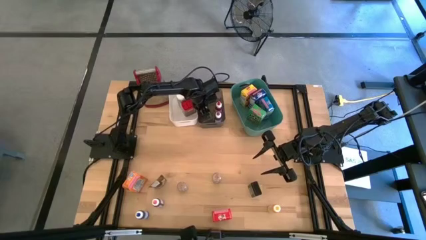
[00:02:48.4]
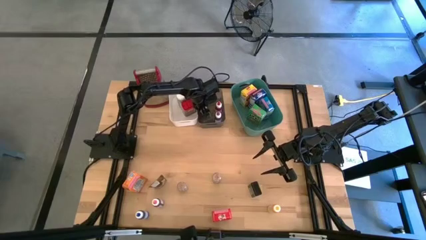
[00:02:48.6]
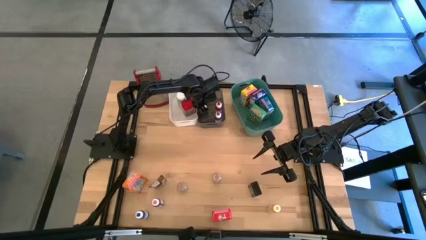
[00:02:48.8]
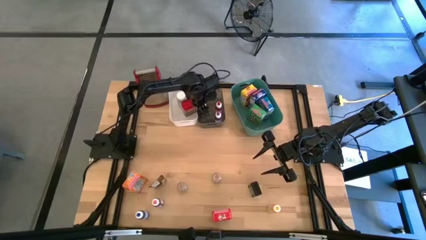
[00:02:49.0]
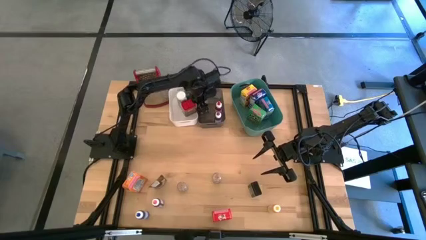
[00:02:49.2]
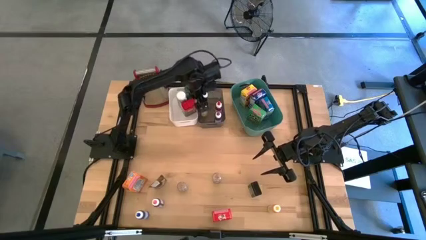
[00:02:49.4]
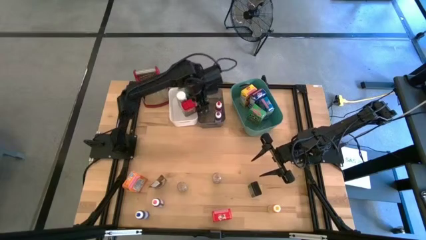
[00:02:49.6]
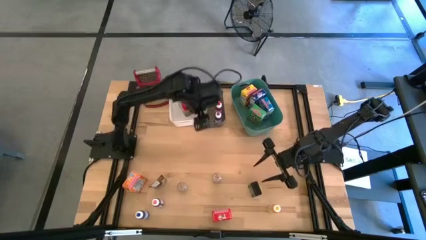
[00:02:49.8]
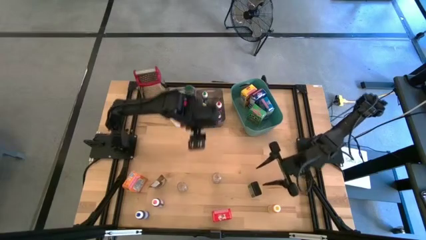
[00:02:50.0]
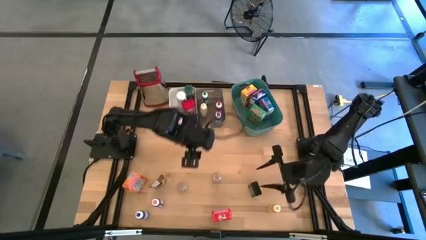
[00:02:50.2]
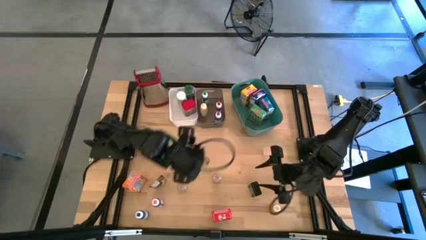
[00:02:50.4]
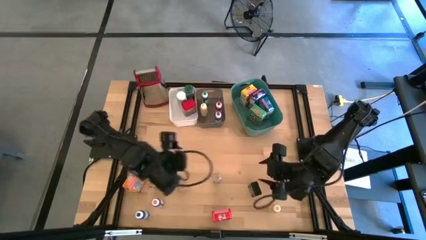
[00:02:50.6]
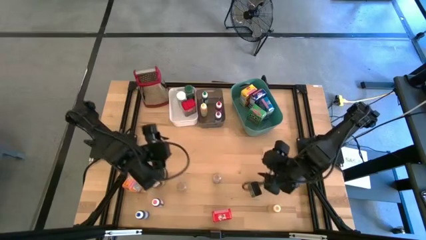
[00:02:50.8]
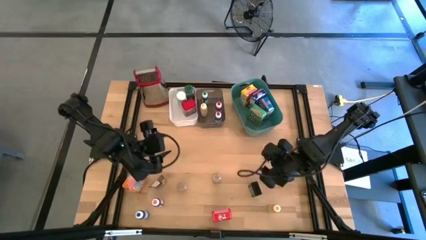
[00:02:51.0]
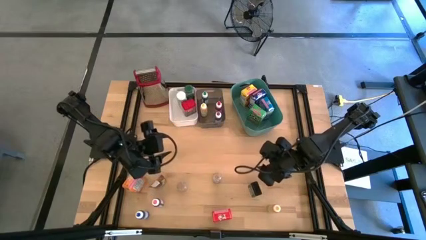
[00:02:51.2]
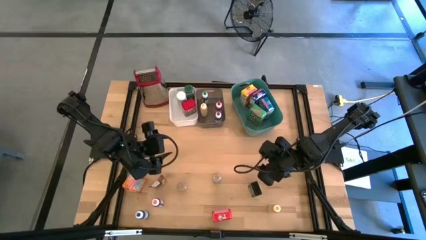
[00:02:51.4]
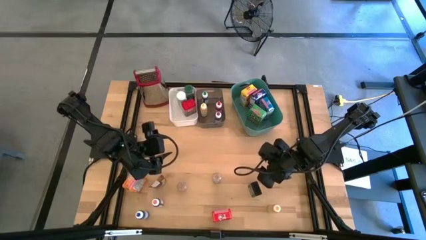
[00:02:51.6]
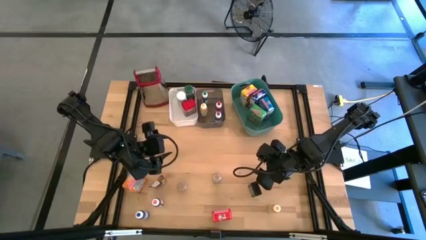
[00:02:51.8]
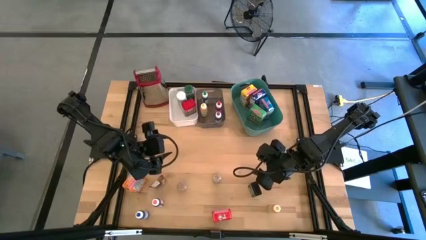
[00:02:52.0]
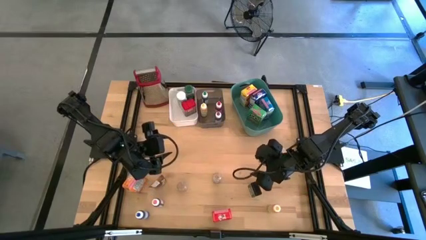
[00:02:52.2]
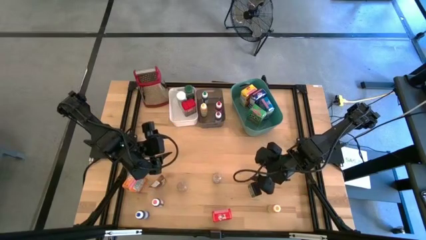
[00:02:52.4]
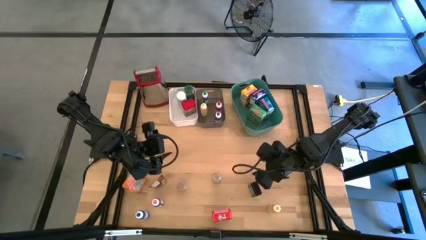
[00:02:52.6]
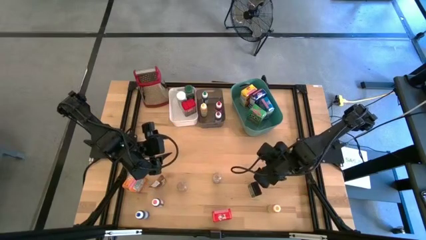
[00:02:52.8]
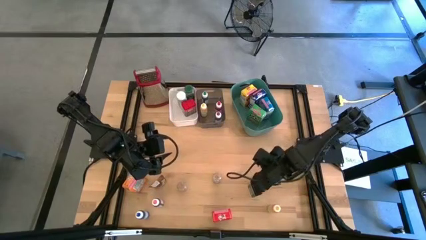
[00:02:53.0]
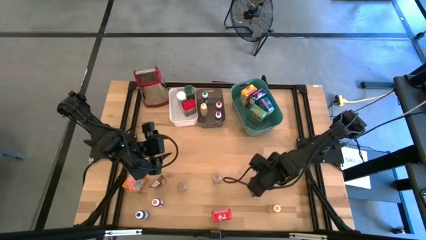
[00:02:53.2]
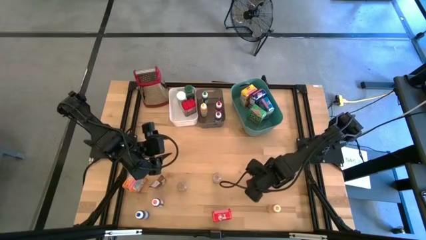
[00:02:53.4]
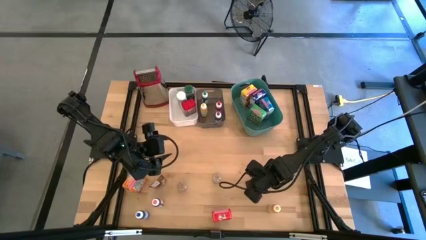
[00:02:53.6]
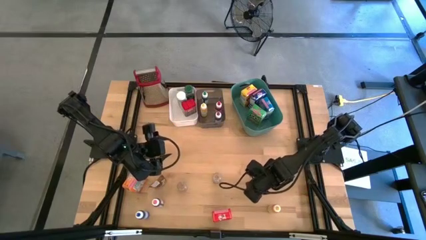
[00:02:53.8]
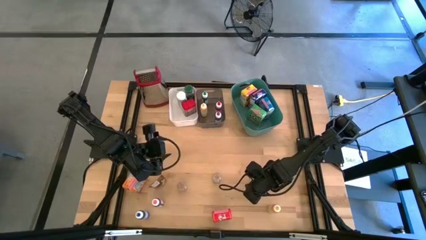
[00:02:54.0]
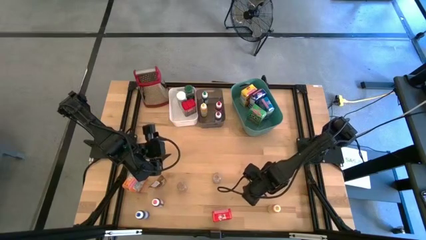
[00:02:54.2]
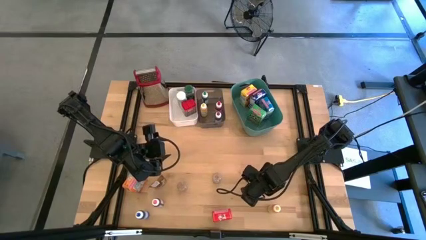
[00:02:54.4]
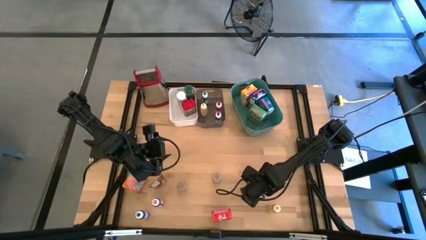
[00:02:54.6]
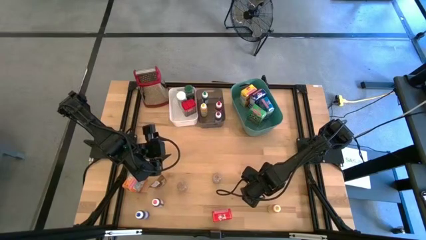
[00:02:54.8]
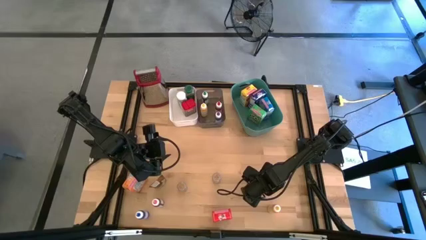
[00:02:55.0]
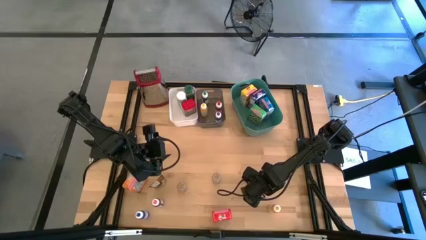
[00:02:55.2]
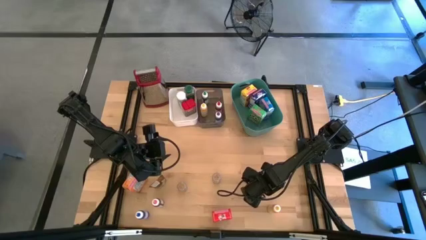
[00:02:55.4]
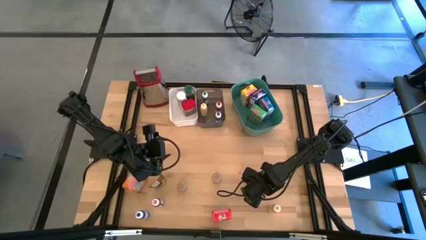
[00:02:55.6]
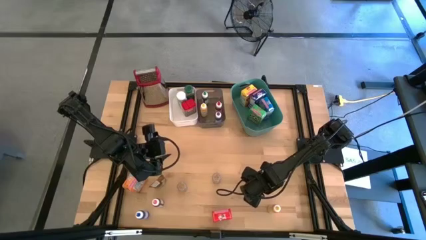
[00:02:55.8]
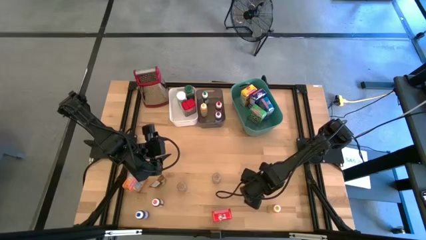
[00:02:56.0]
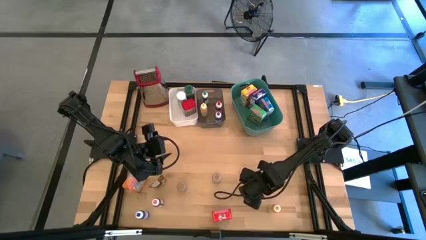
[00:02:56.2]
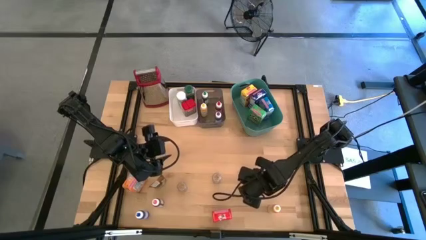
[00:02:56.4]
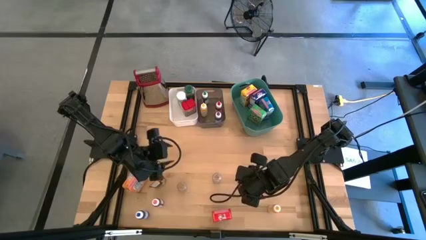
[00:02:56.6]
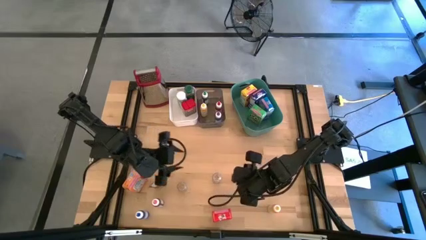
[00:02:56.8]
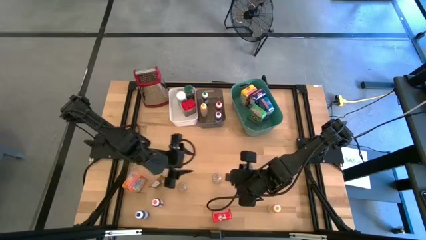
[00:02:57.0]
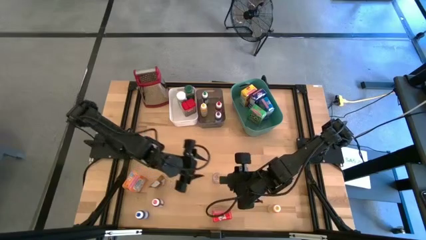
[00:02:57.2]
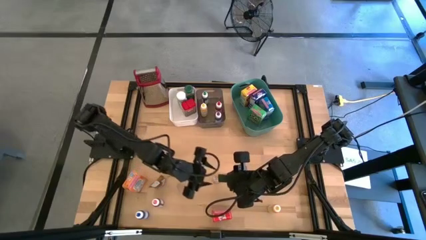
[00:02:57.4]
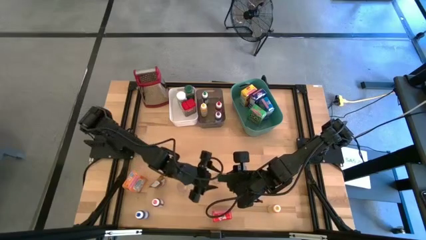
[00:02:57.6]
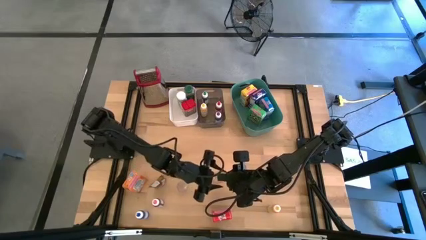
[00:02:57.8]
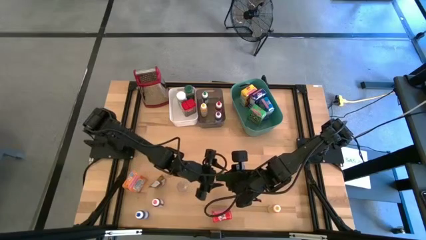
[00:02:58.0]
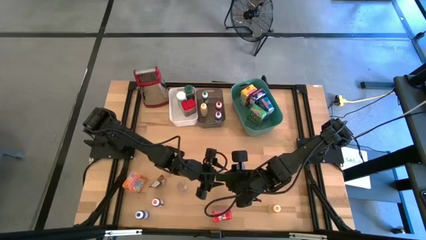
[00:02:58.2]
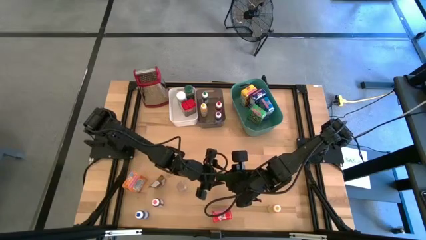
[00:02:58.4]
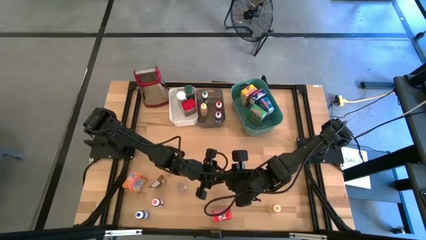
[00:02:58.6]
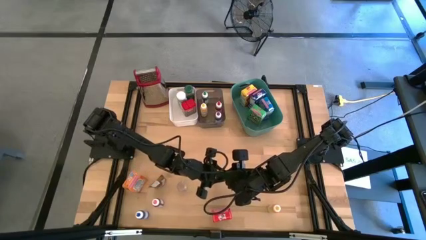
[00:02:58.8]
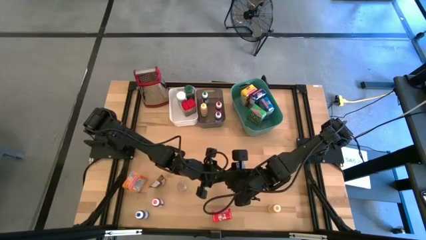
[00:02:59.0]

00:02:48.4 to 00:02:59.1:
Task: Pick & Place Kitchen Items
Put the black spice can into the left white bin

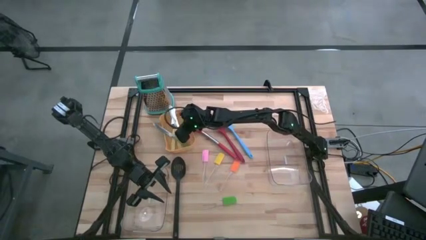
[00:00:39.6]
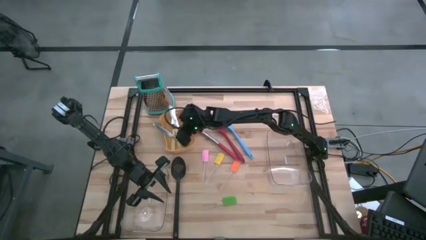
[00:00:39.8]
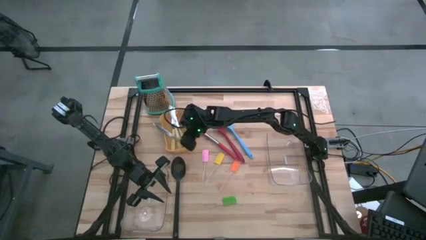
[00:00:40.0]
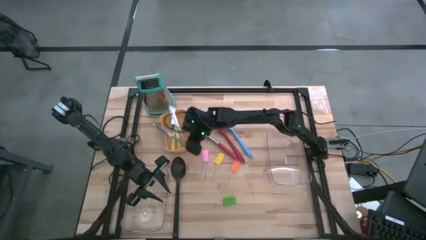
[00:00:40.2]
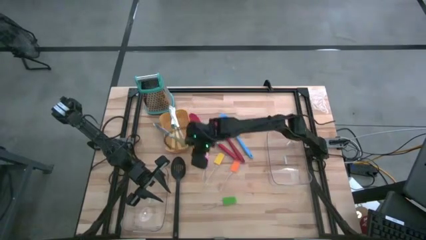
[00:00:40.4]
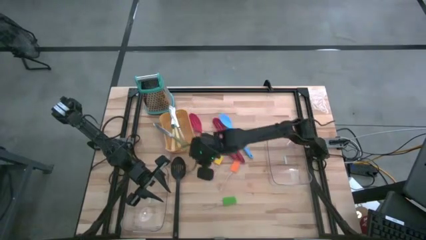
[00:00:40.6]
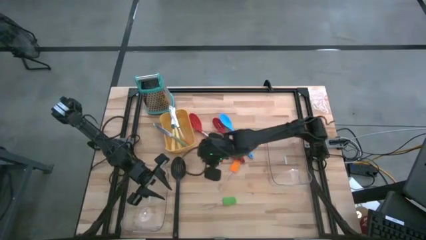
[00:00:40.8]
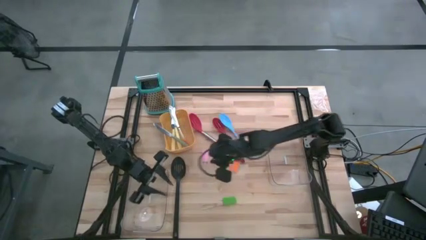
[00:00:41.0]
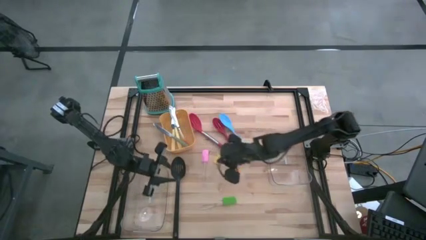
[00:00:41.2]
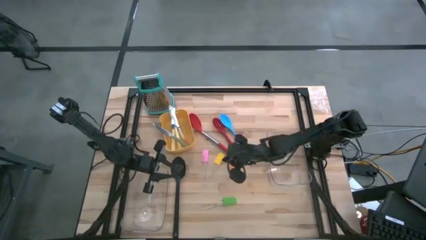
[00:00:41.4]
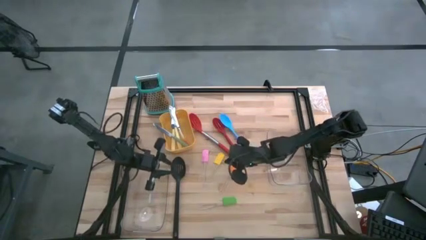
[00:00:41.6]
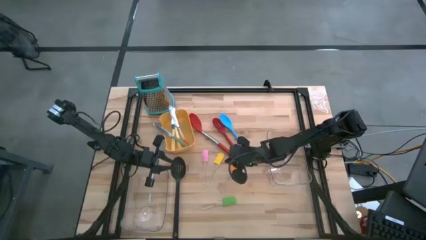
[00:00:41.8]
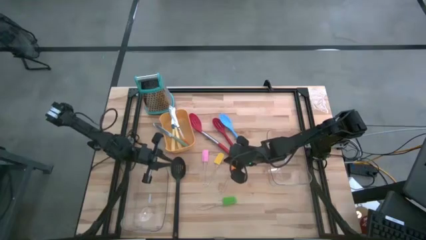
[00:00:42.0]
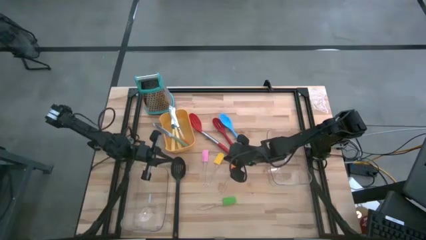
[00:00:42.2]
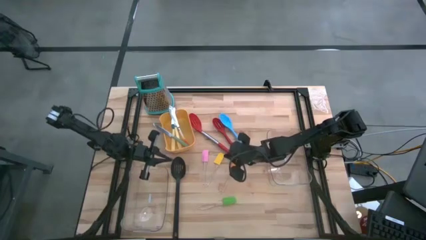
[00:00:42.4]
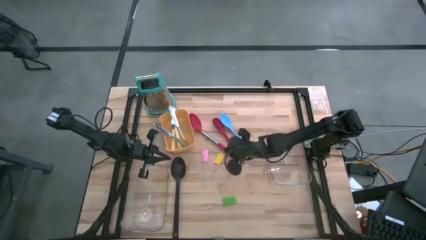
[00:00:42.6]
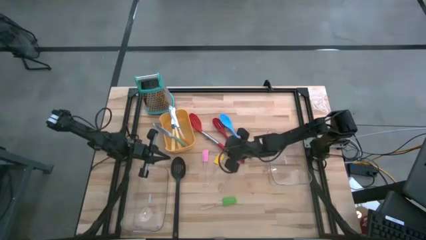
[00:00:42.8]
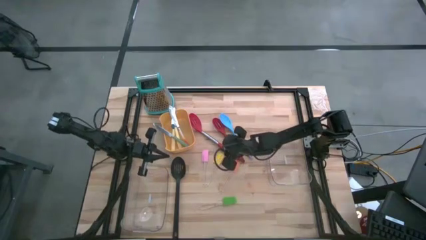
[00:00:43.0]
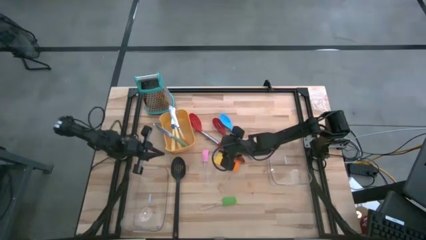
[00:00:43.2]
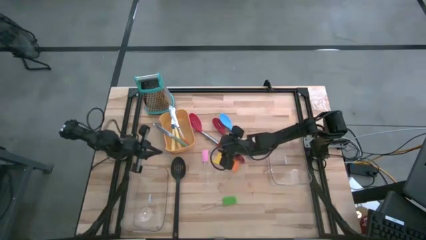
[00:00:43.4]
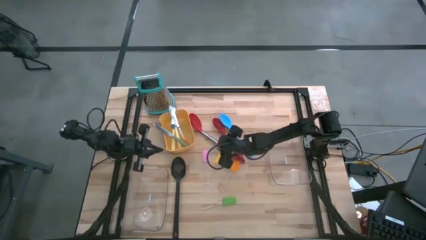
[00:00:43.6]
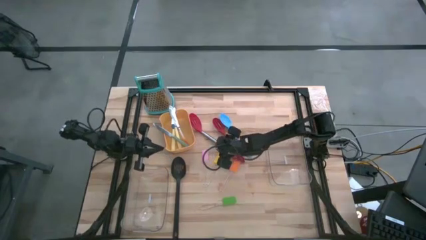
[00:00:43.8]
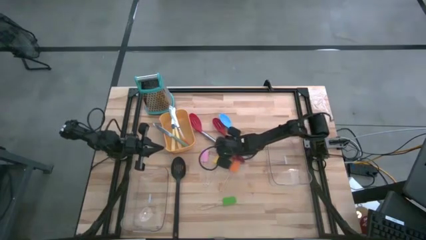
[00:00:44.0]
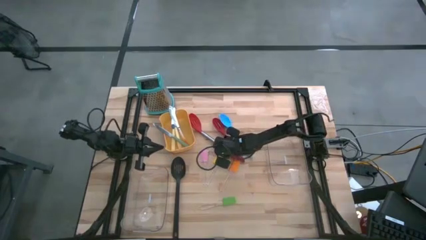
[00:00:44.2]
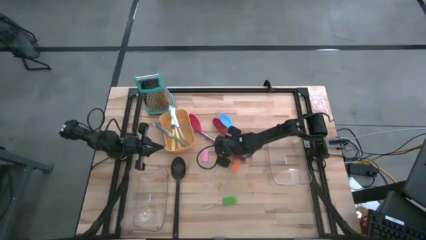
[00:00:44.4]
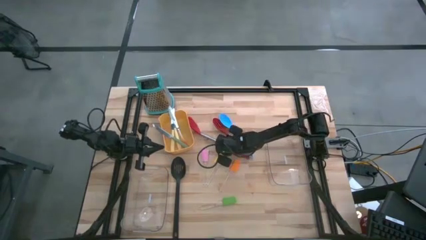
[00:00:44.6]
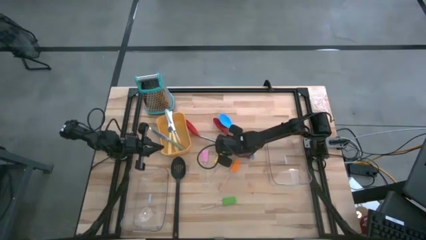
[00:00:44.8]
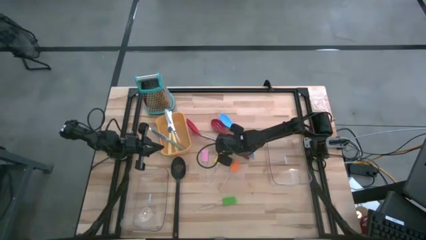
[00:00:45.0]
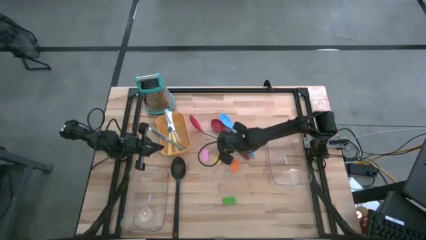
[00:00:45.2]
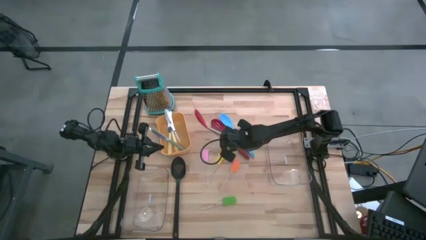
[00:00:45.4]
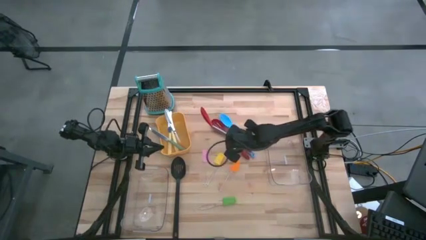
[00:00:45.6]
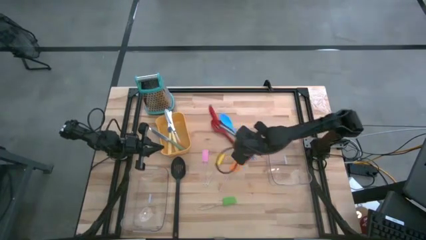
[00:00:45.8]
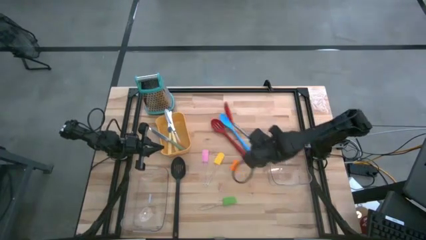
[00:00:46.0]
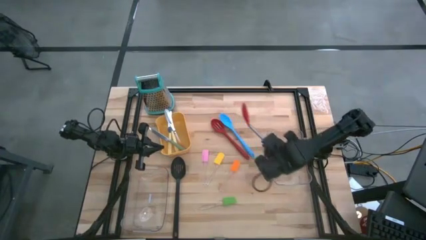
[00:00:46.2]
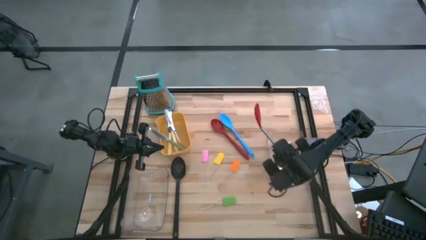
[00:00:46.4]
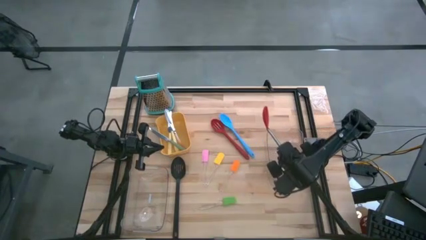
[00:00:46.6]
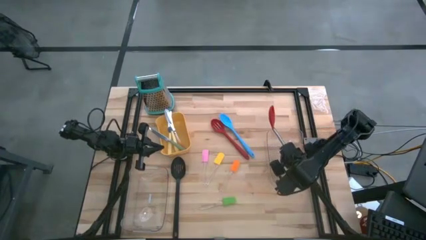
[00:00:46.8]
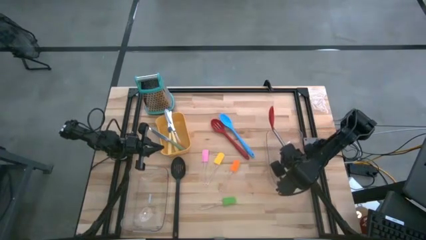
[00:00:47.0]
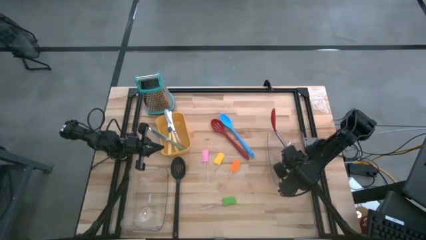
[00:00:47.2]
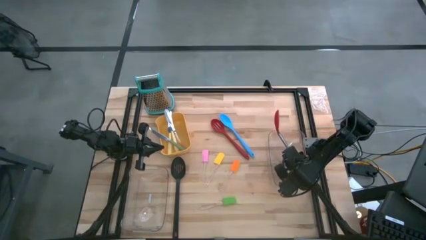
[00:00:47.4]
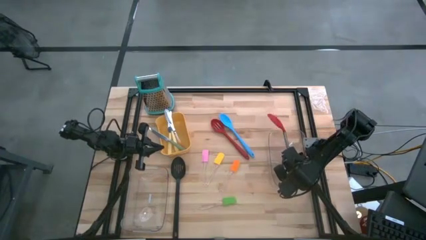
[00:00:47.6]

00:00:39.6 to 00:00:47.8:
Task: Pick & Place Kitchen Items
Put the red and silver slotted spoon into the right transparent bin
